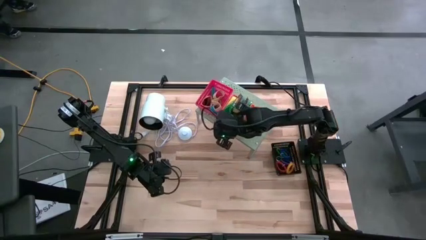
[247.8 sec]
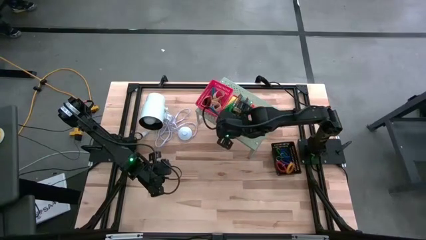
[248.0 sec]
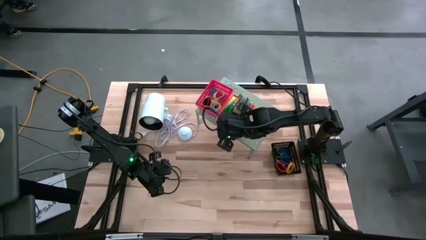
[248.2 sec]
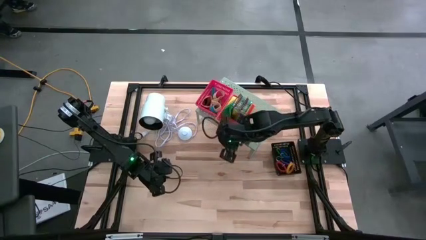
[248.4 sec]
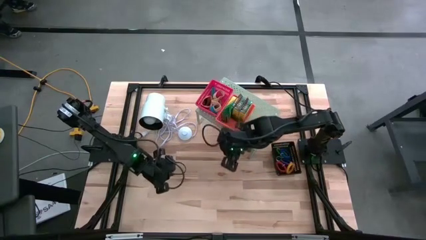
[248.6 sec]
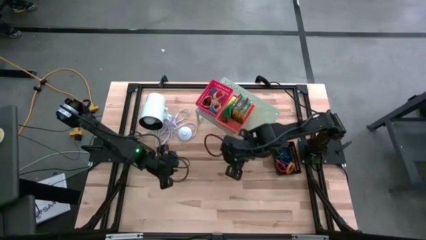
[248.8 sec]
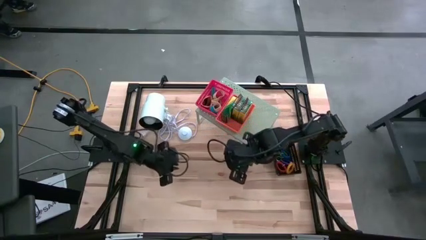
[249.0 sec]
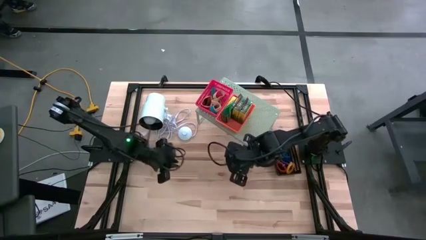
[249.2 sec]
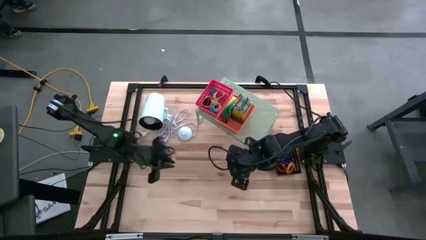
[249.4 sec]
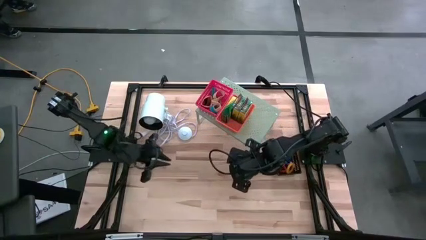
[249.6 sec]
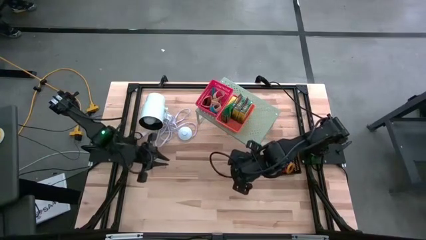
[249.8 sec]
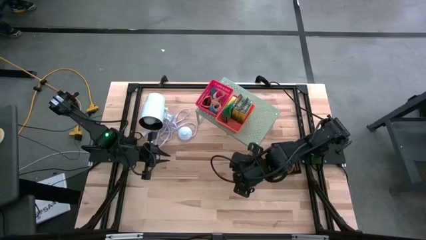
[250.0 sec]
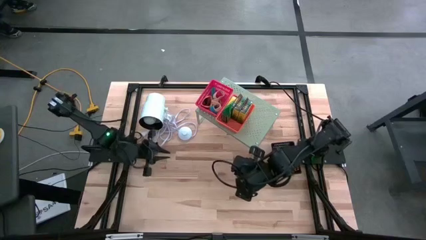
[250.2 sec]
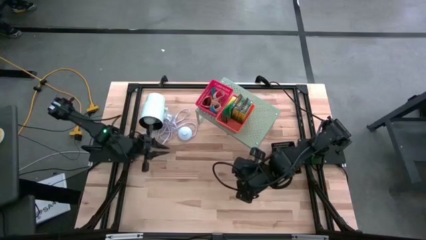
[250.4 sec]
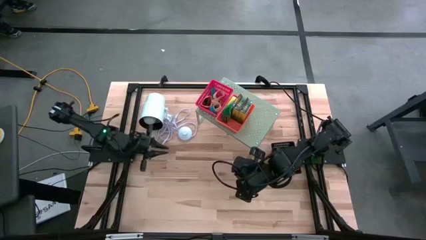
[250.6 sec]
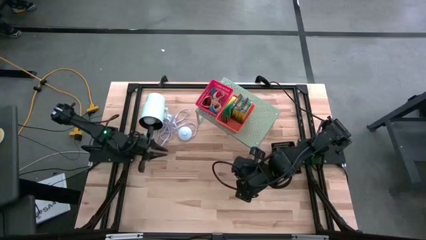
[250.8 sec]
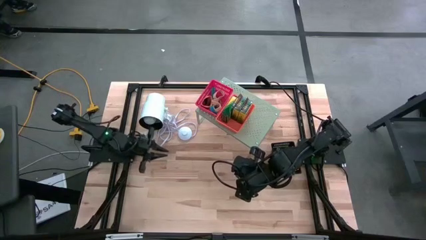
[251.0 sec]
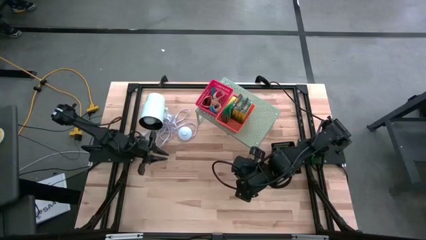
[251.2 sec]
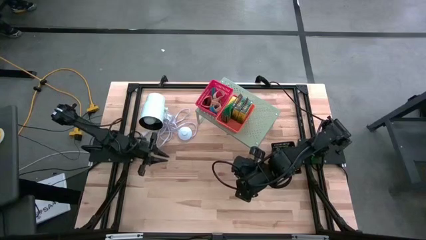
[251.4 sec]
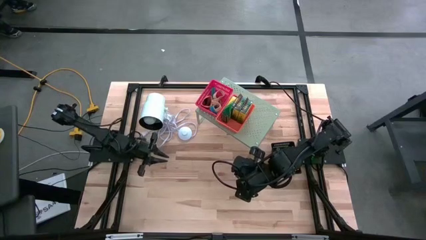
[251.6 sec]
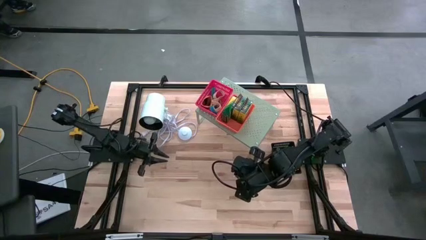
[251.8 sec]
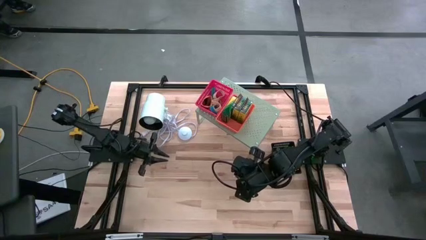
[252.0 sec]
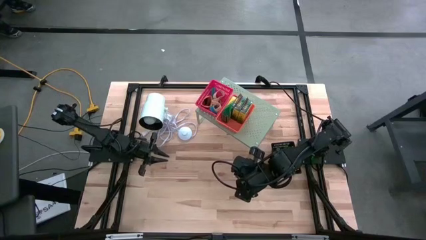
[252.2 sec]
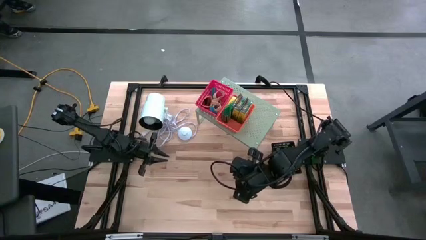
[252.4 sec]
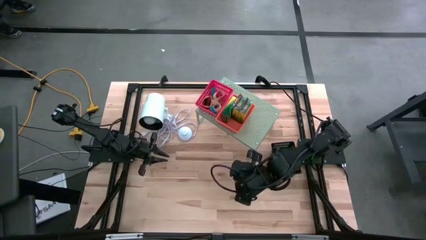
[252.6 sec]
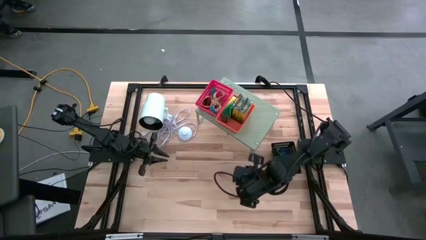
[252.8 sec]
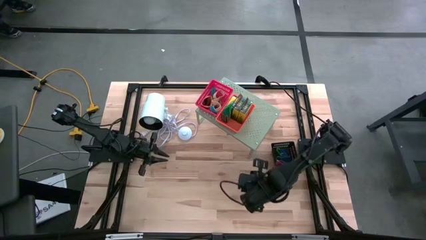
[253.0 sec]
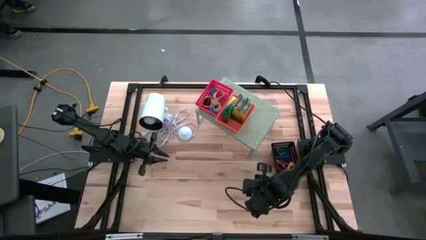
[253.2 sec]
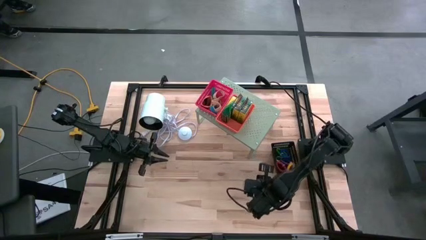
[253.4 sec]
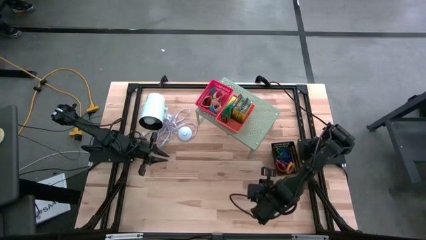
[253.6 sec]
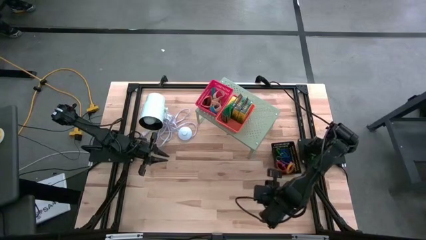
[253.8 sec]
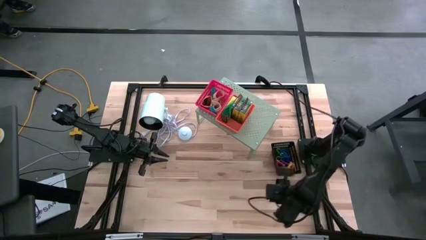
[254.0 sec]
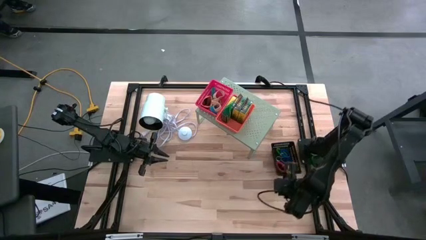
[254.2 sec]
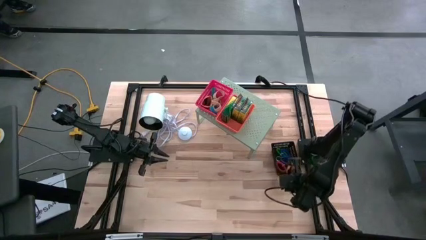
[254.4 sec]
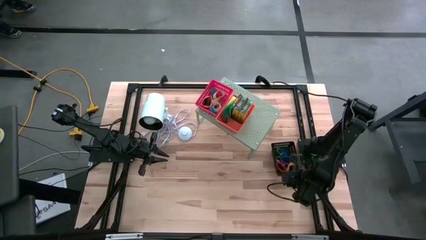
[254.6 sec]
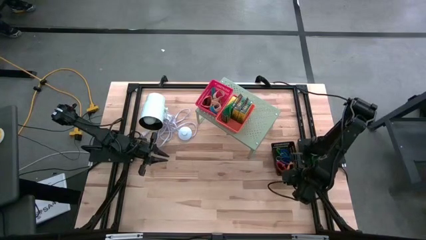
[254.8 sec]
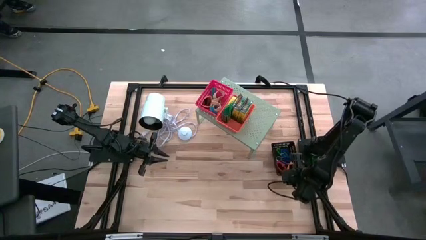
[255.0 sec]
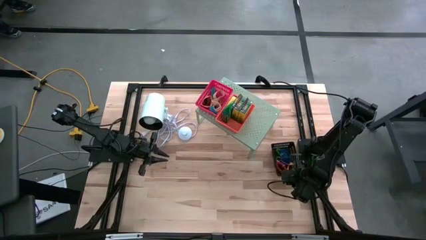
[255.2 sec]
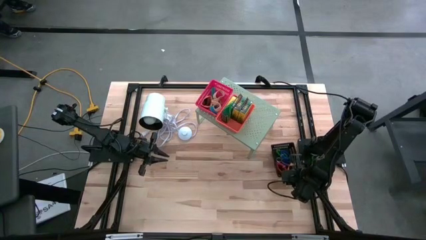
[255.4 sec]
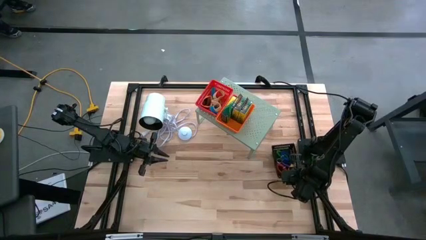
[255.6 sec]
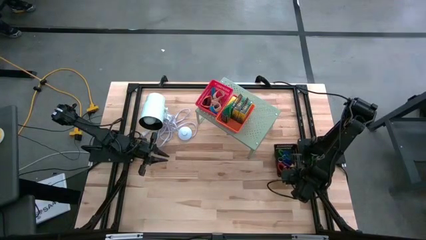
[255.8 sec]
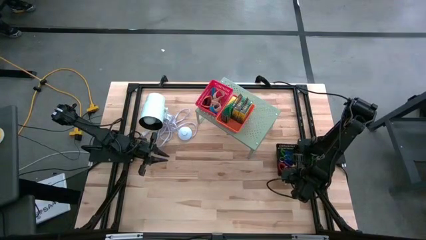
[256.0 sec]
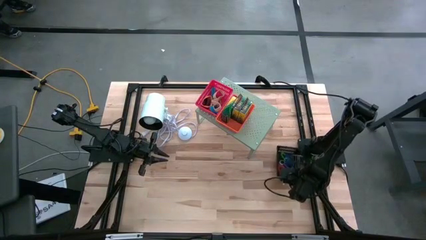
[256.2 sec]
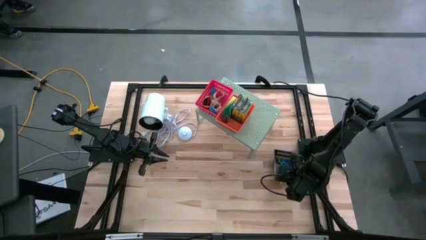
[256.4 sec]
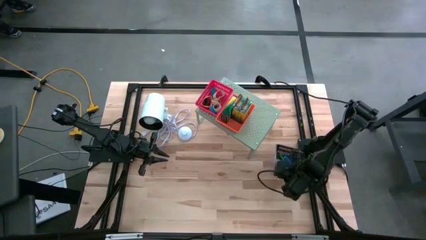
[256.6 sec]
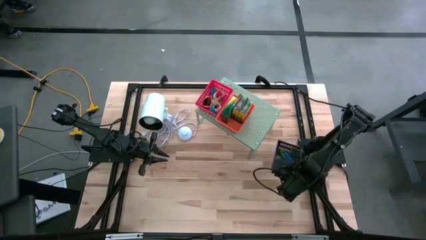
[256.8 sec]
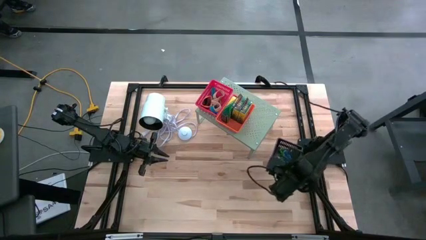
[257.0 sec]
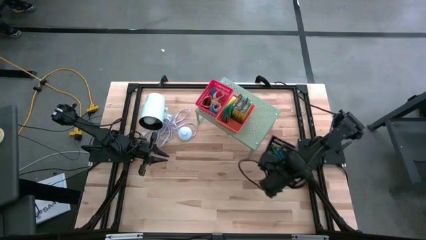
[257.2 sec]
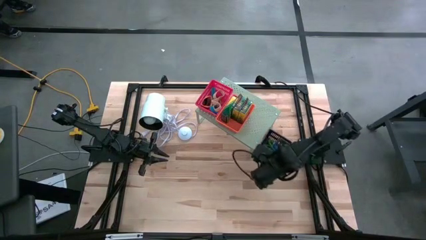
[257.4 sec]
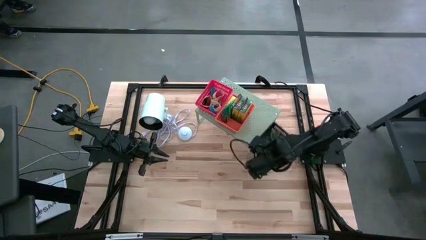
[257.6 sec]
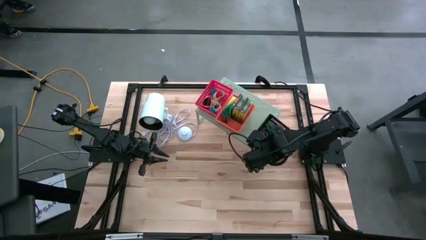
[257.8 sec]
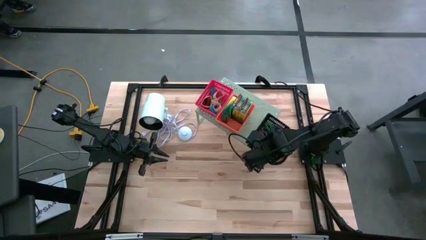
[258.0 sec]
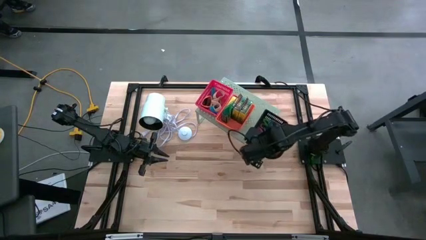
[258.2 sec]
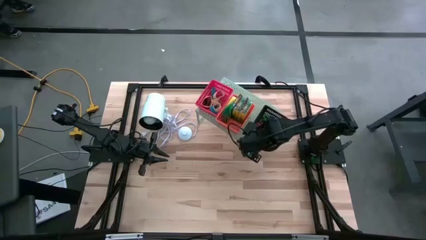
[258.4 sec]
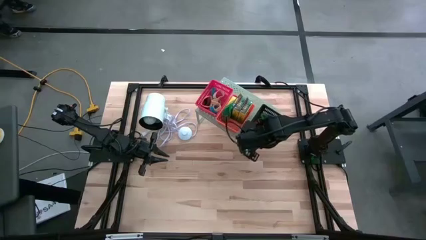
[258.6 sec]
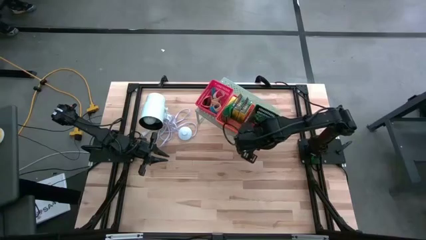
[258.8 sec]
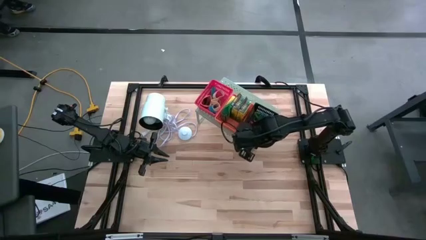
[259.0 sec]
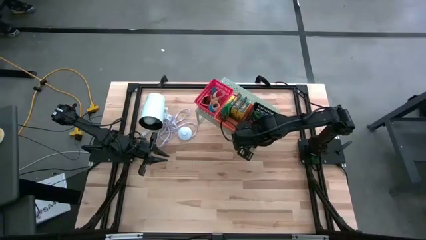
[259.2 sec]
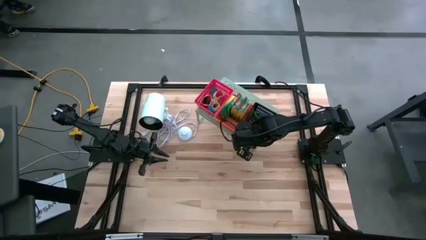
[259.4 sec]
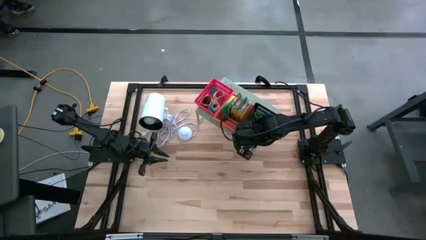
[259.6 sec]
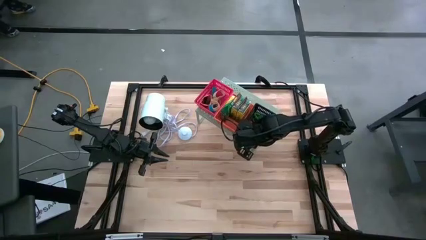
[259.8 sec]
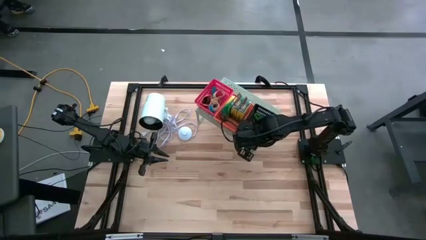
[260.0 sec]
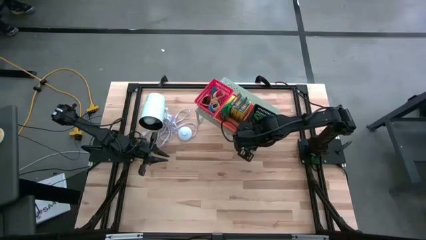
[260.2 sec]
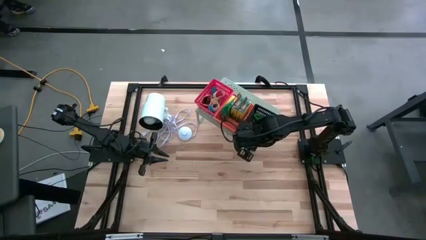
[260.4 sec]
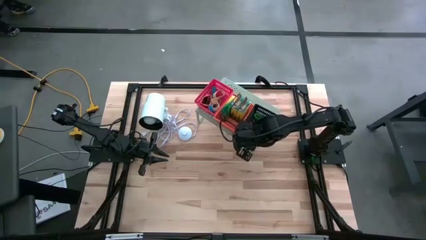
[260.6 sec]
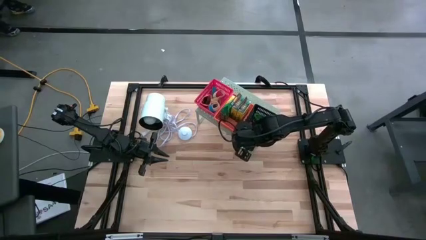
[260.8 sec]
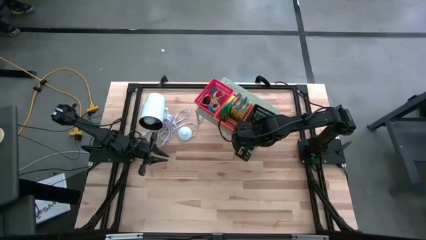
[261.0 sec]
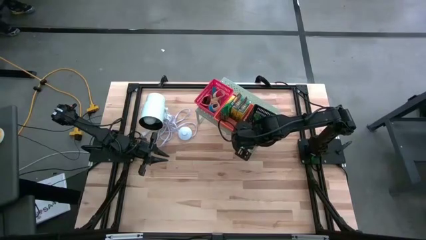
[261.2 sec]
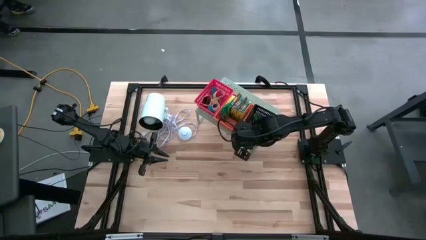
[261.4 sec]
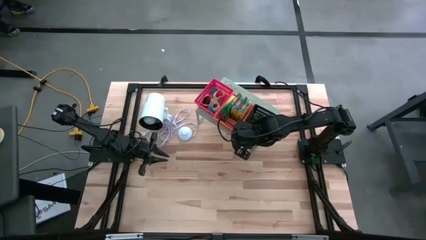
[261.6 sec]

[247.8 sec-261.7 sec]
Task: Pick & Place Office Desk Supplies
Put the black bin into the shelf
